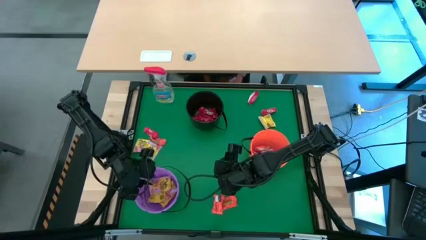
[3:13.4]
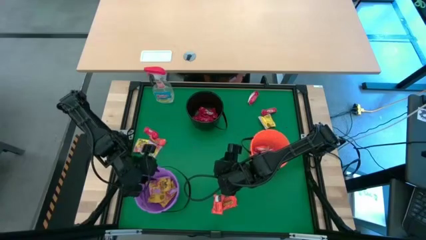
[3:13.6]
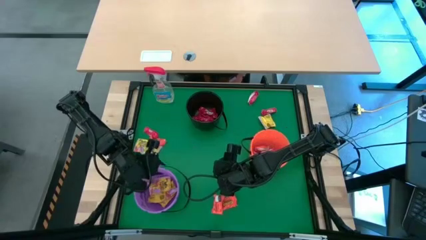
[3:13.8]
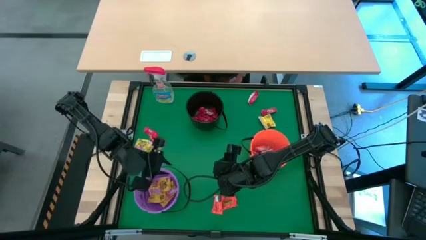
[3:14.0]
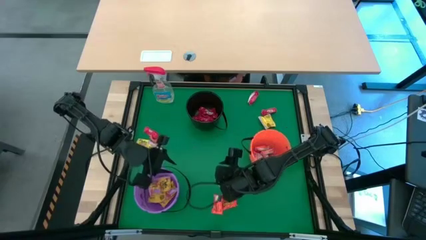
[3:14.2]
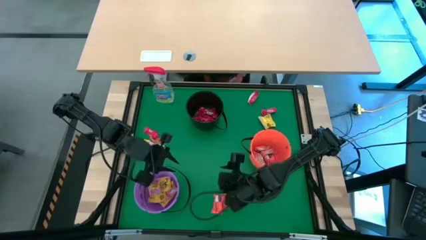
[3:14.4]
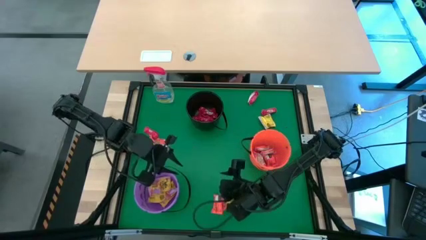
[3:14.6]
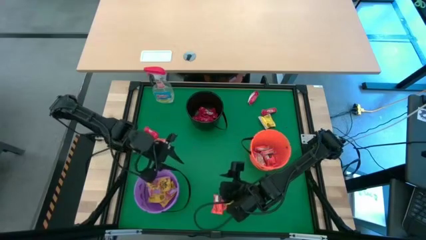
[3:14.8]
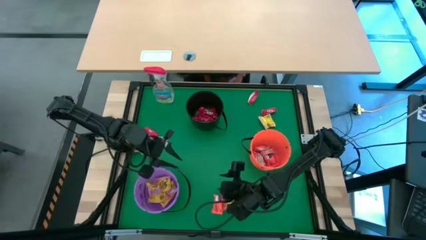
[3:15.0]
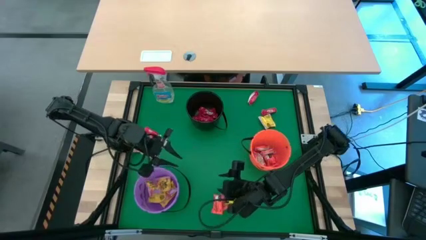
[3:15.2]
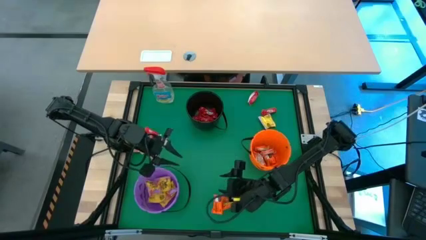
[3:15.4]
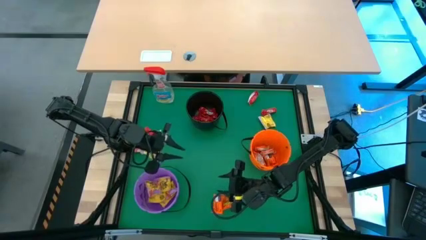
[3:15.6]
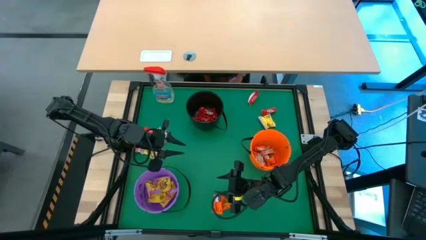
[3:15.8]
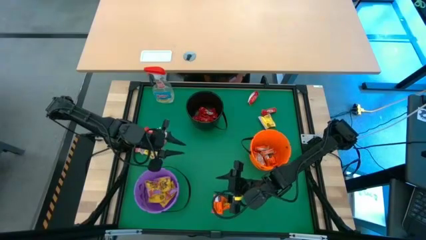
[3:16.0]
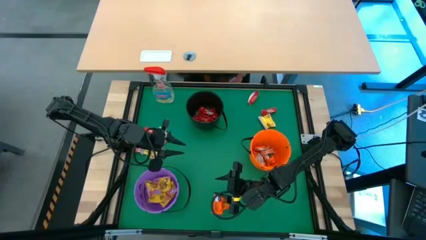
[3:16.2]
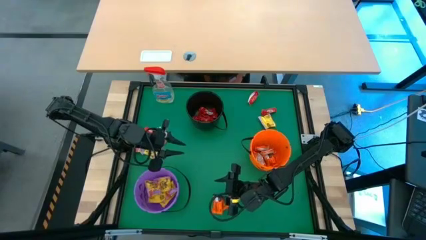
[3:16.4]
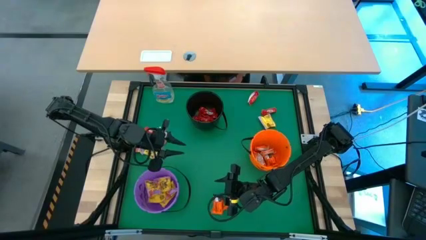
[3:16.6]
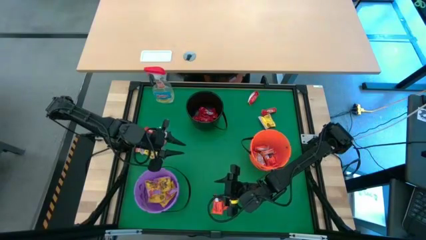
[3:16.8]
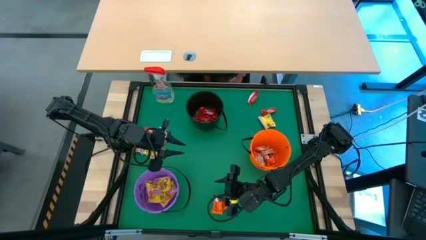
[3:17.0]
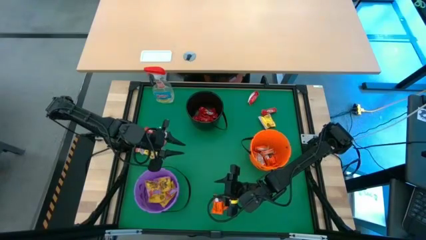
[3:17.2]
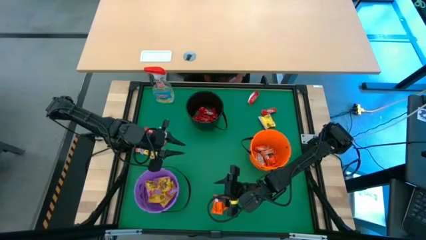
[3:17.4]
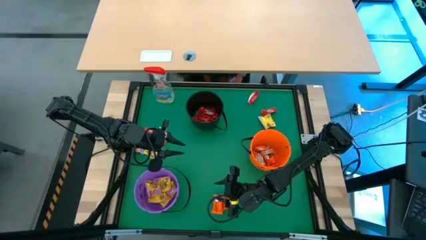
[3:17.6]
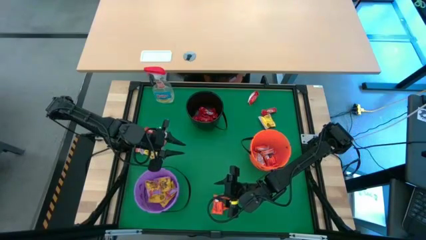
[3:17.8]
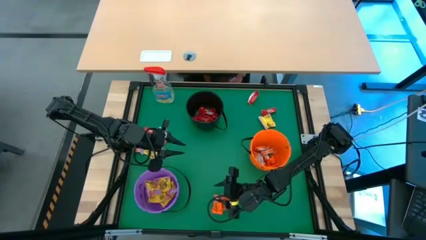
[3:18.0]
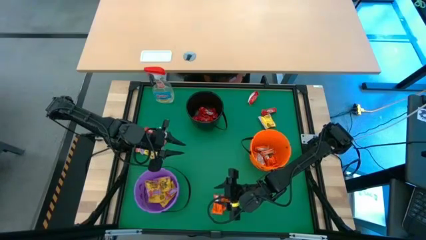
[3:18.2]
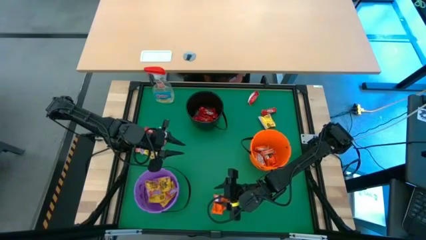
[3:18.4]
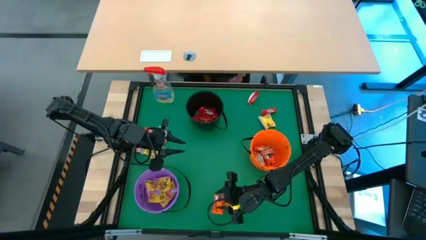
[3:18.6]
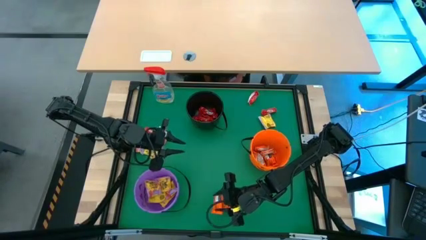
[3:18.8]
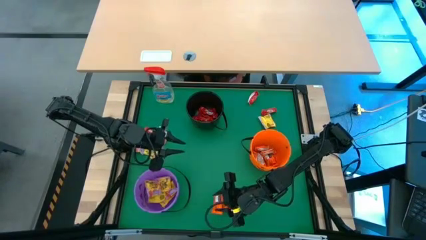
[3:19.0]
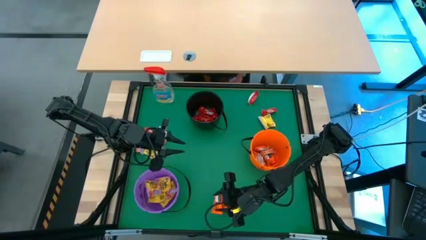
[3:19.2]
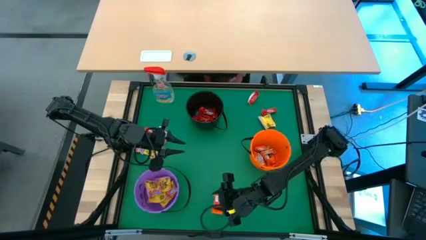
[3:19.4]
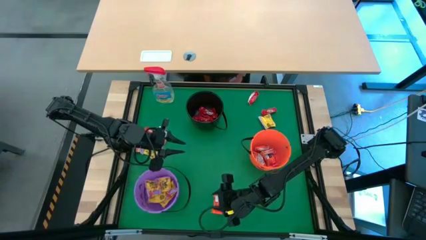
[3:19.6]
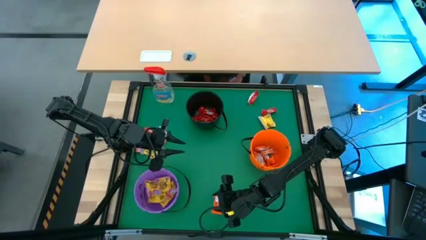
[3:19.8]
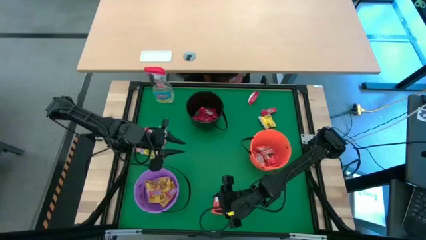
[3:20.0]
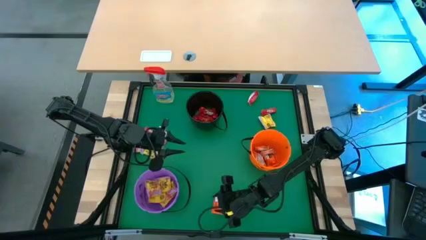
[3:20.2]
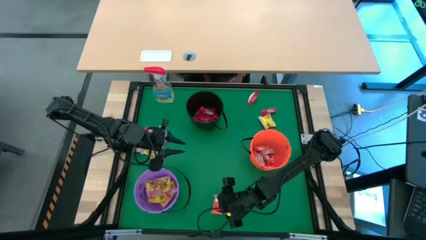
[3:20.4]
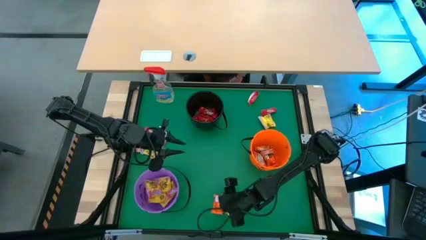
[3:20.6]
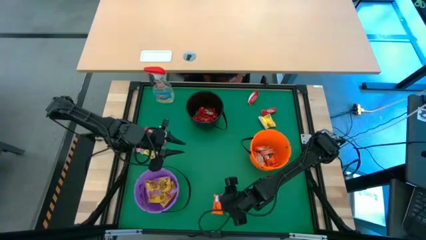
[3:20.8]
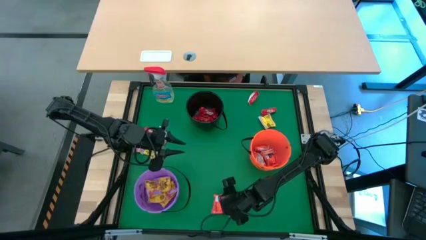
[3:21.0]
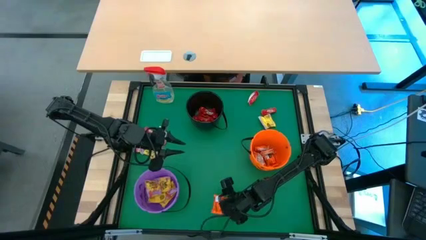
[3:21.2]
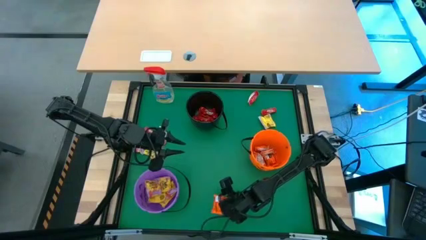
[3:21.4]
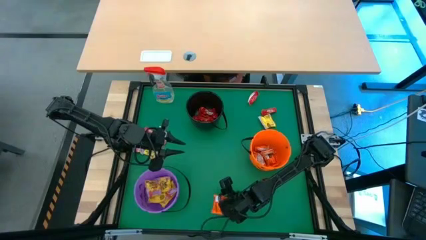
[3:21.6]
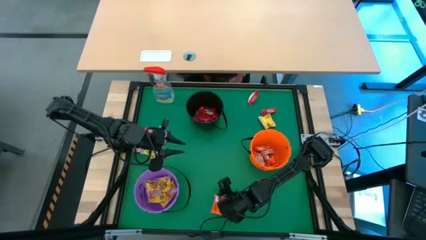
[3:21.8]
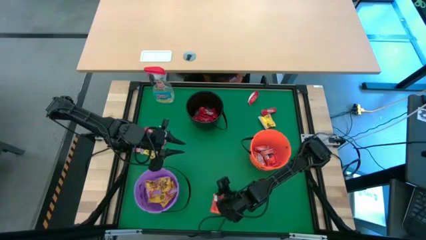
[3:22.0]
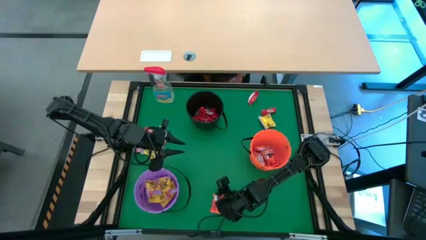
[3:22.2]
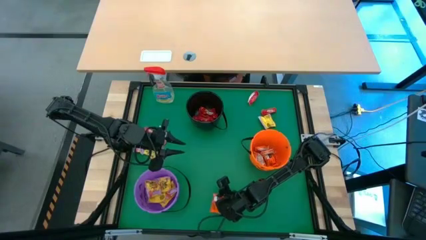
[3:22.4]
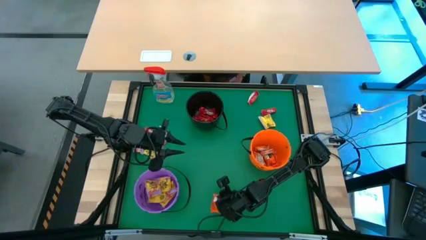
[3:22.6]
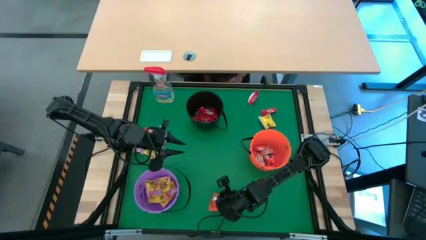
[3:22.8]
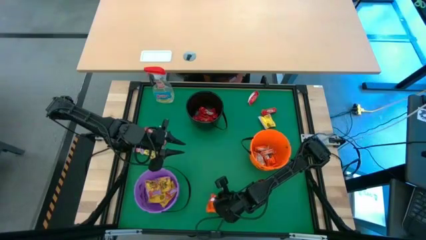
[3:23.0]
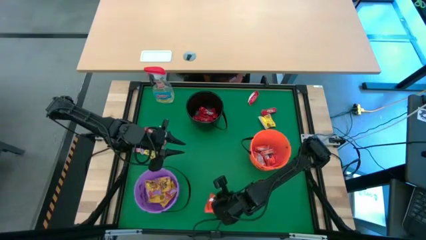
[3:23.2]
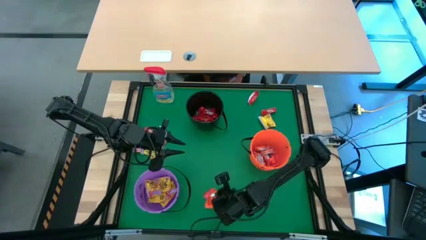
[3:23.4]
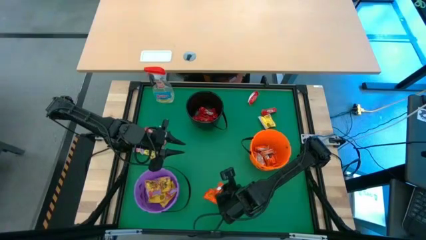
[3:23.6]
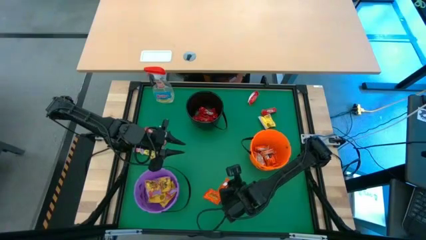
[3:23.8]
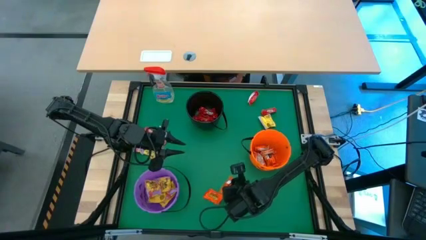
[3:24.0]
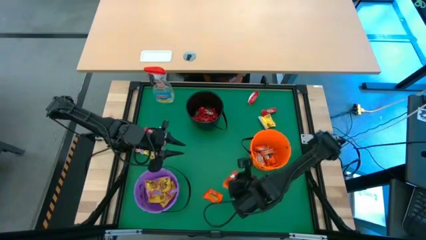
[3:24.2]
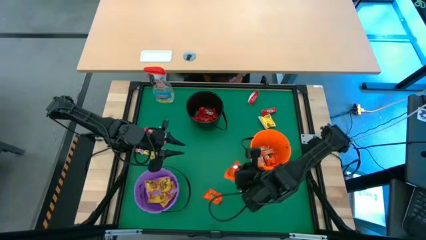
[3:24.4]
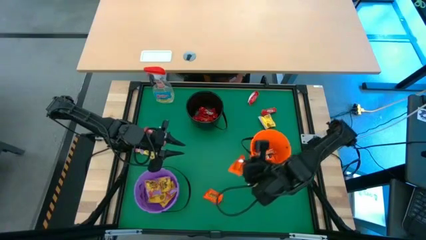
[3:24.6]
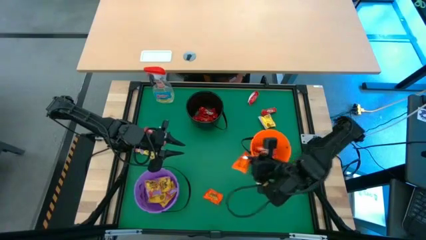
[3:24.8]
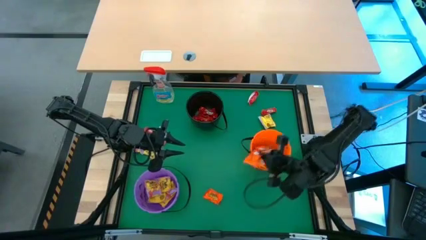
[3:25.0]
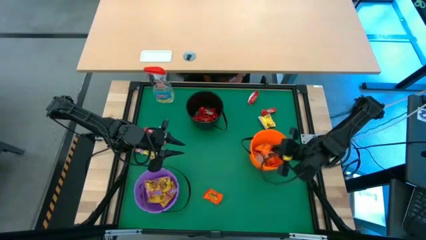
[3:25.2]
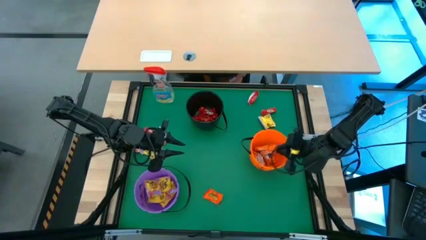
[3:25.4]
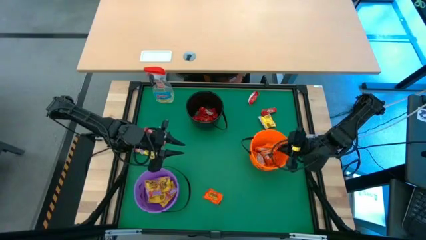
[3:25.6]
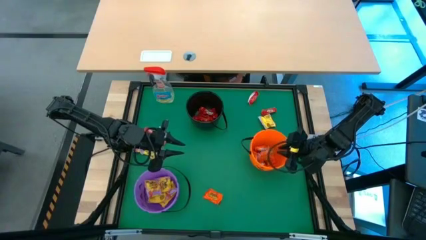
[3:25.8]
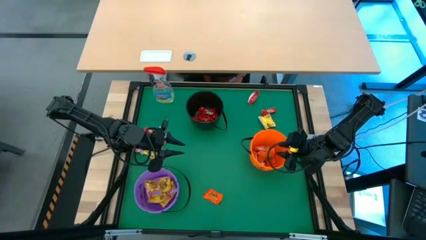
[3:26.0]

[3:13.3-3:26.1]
Task: Sort candy
Put the orange candy into the orange bucket

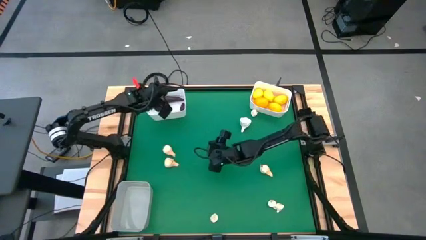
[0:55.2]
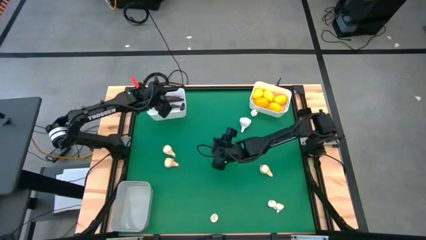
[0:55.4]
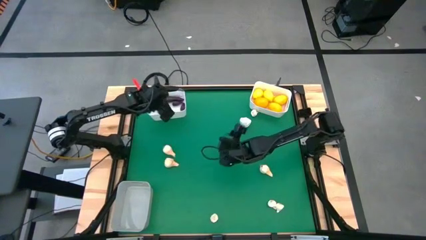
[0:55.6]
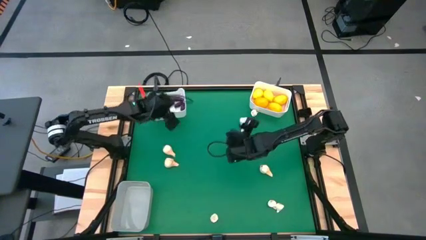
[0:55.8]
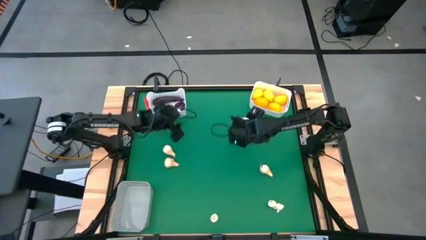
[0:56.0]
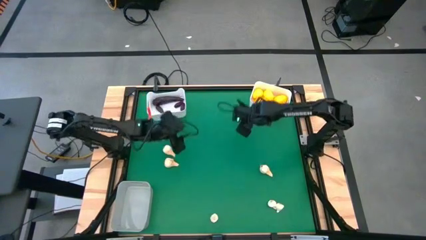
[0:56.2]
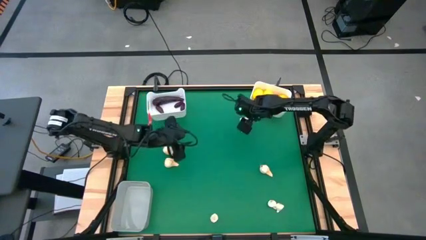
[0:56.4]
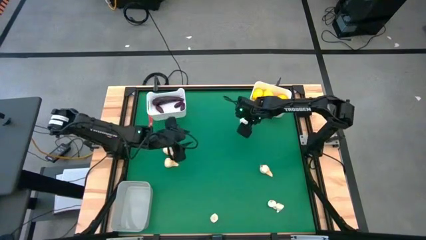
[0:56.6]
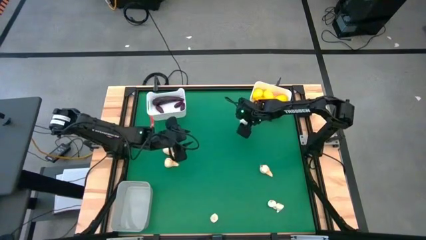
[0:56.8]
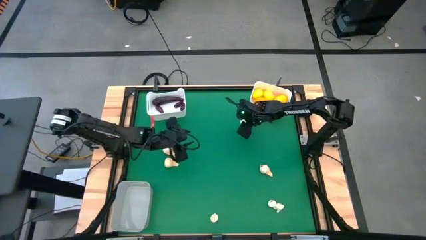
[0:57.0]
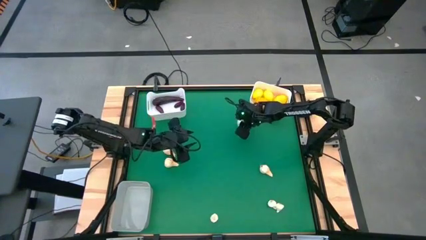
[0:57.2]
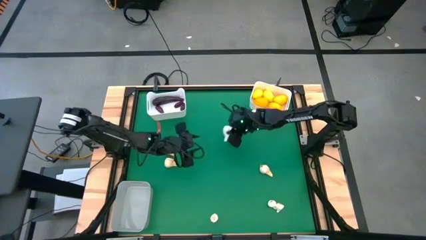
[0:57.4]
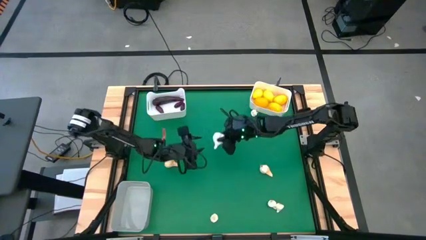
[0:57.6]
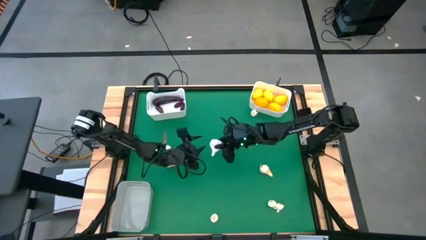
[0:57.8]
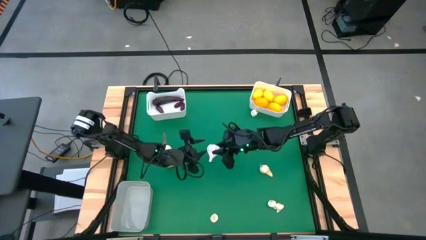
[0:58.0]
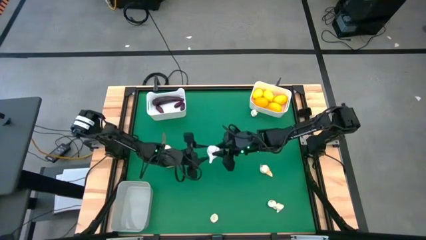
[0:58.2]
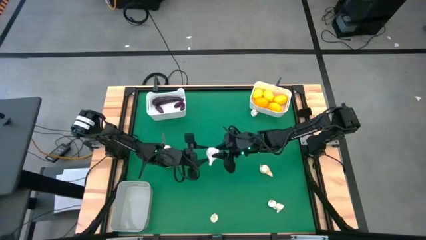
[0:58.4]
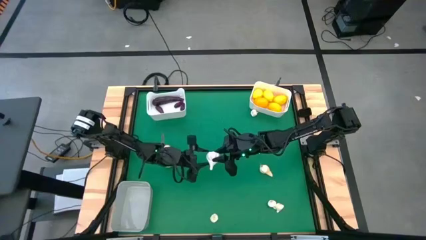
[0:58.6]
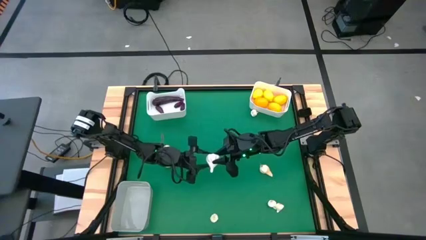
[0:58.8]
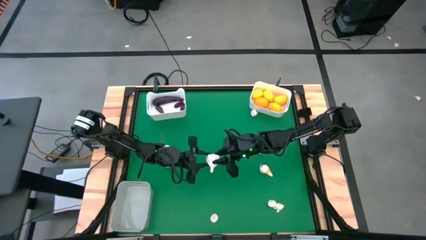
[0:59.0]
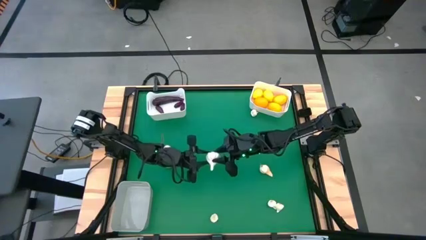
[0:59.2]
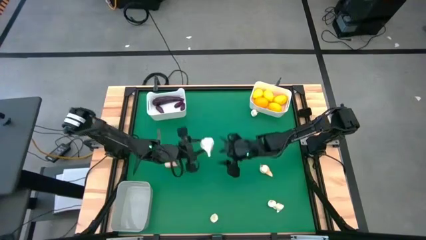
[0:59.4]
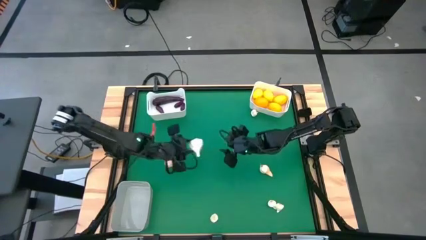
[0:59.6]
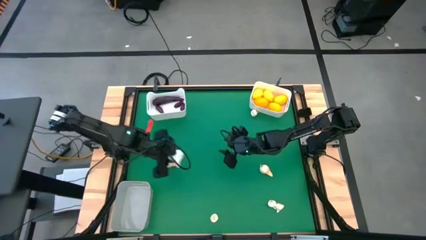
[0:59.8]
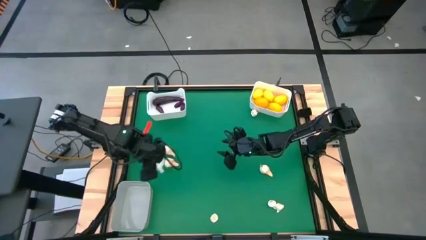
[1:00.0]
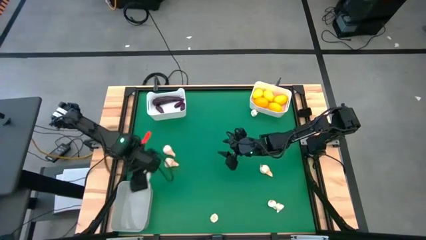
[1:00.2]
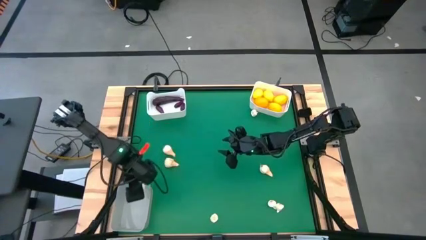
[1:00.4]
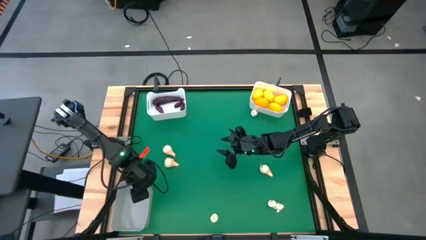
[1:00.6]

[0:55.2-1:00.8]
Task: Sort produce into baskets
Put the top white garlic into the gray bin
